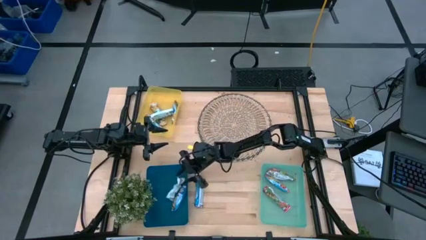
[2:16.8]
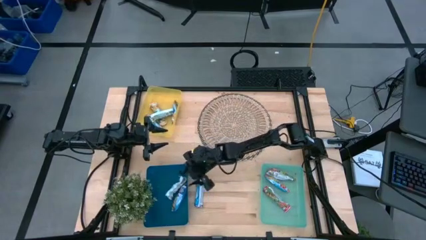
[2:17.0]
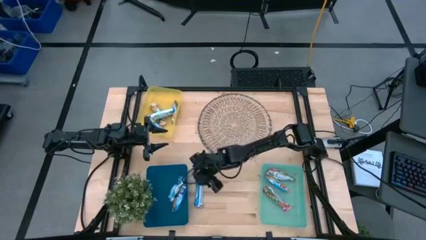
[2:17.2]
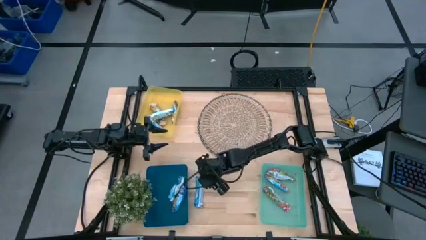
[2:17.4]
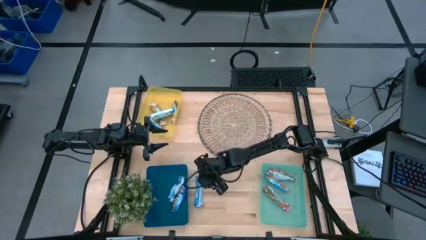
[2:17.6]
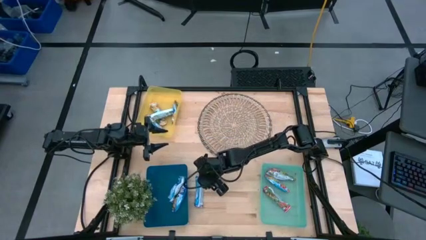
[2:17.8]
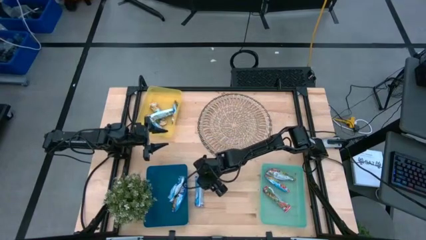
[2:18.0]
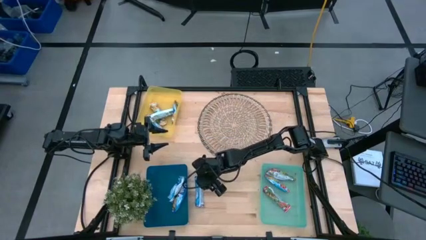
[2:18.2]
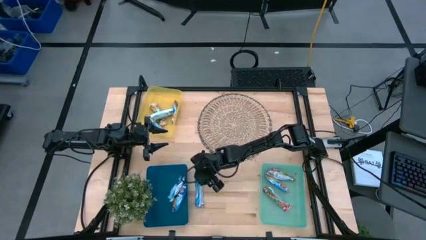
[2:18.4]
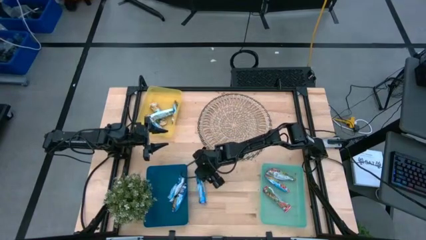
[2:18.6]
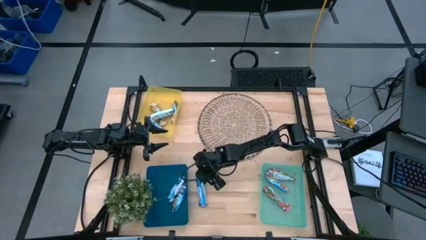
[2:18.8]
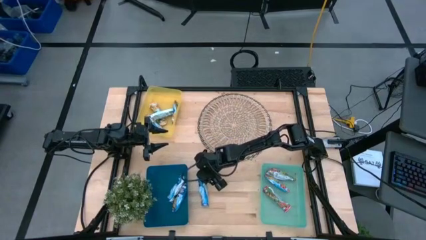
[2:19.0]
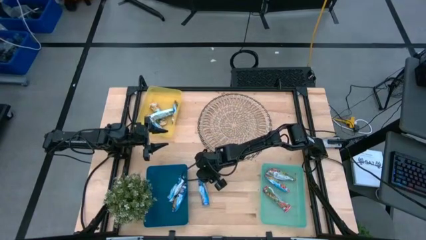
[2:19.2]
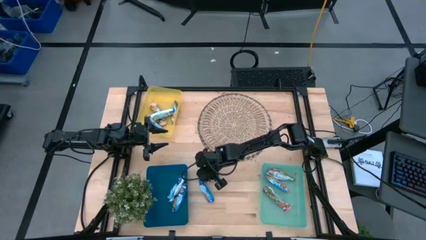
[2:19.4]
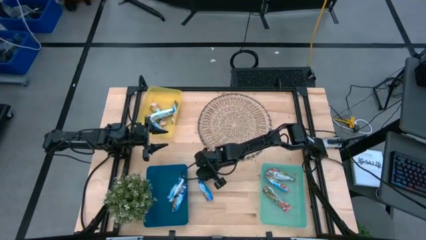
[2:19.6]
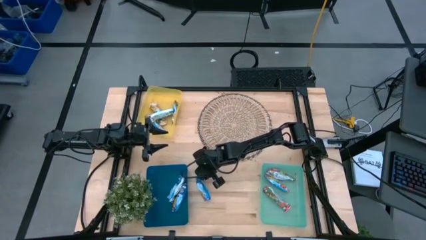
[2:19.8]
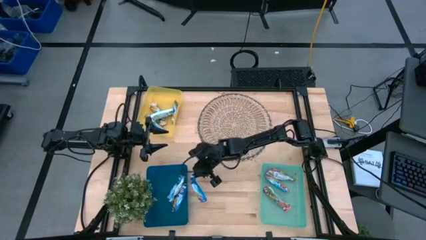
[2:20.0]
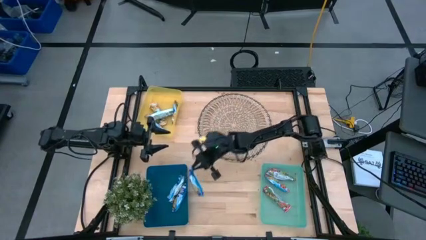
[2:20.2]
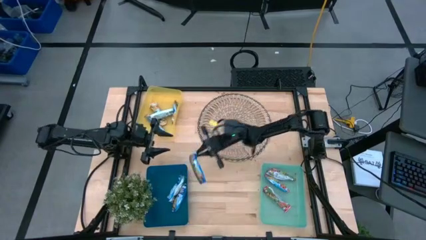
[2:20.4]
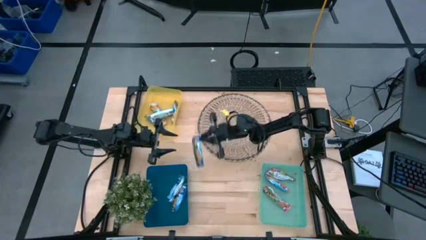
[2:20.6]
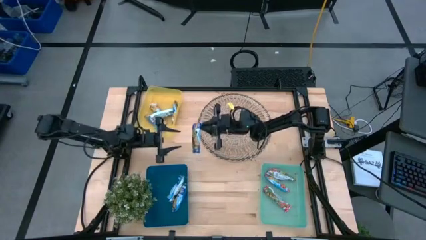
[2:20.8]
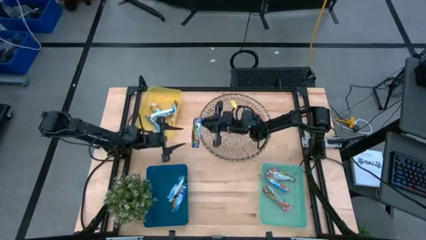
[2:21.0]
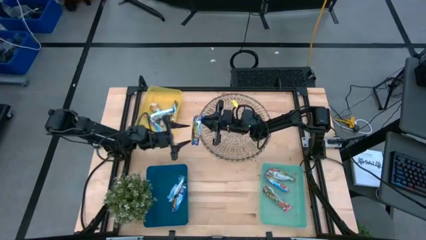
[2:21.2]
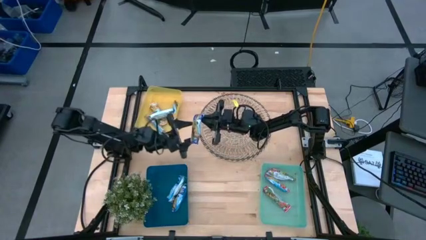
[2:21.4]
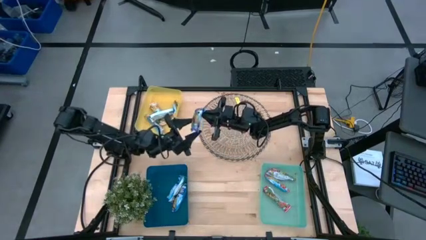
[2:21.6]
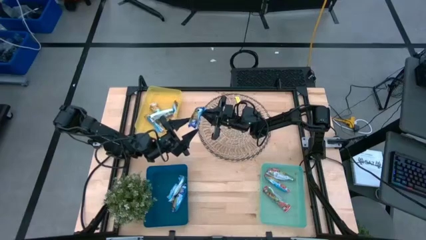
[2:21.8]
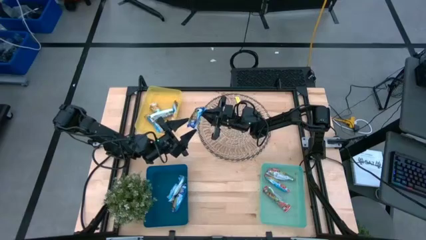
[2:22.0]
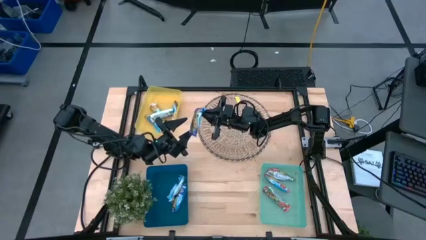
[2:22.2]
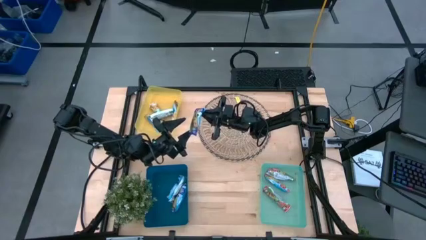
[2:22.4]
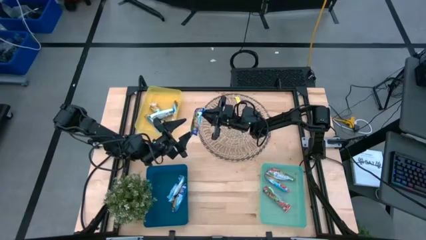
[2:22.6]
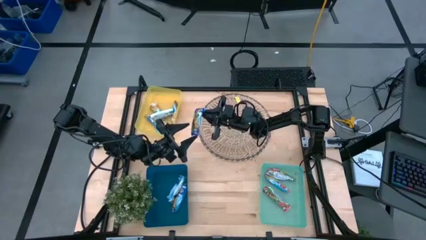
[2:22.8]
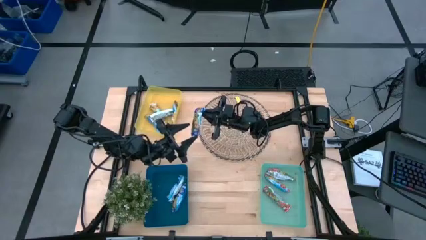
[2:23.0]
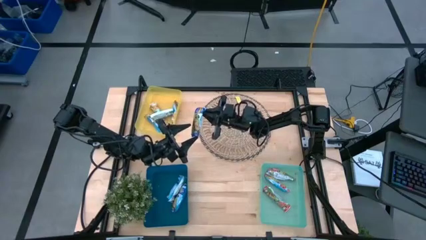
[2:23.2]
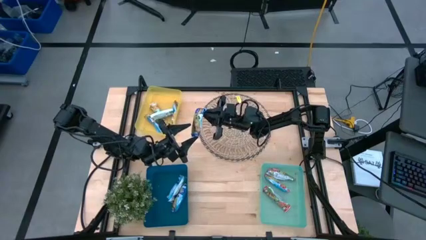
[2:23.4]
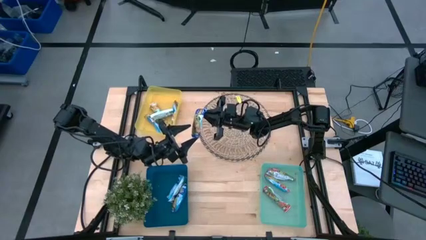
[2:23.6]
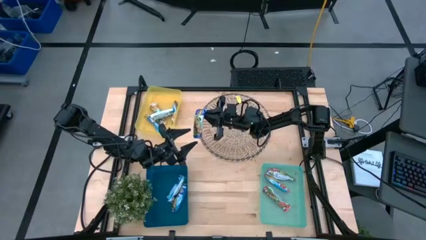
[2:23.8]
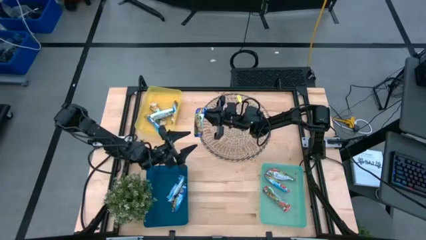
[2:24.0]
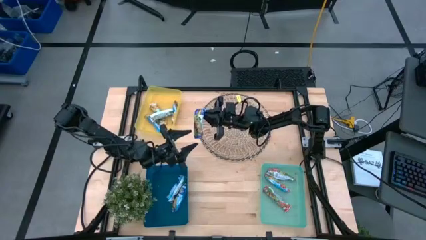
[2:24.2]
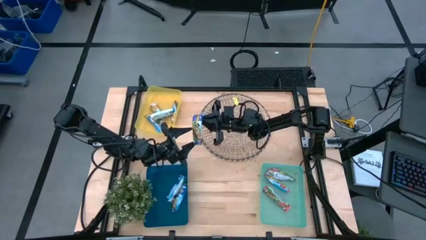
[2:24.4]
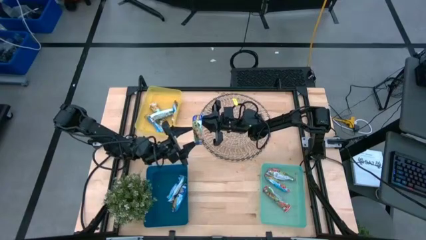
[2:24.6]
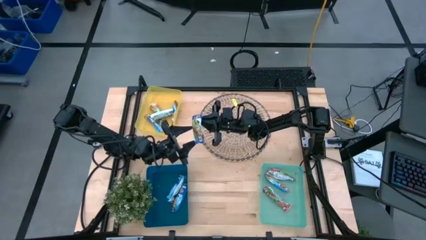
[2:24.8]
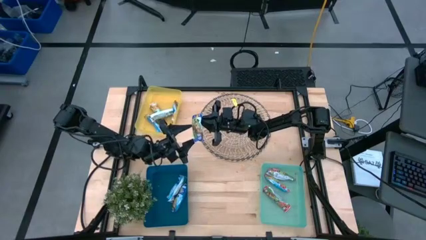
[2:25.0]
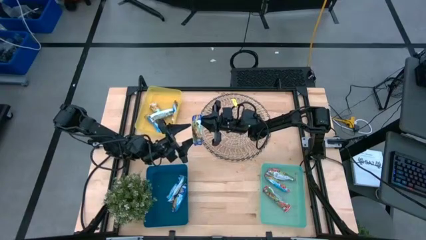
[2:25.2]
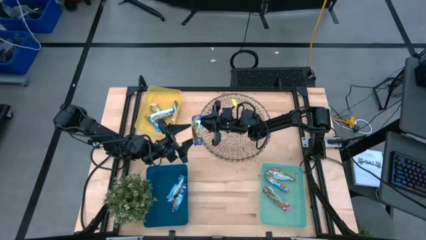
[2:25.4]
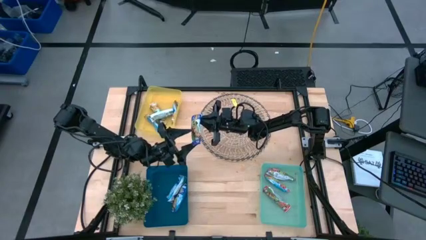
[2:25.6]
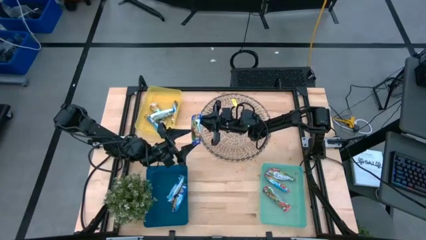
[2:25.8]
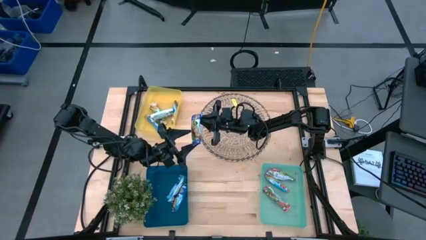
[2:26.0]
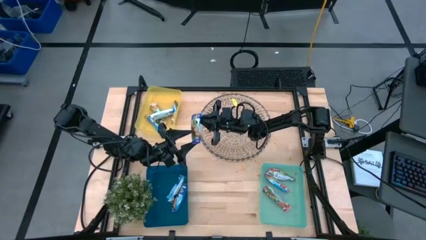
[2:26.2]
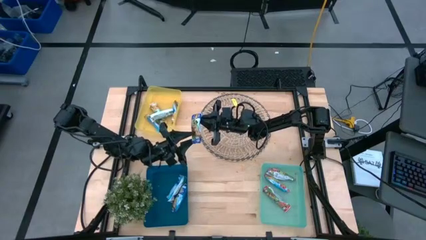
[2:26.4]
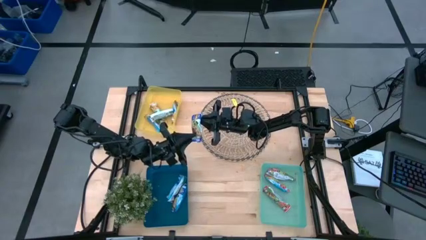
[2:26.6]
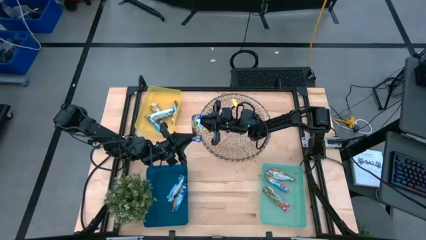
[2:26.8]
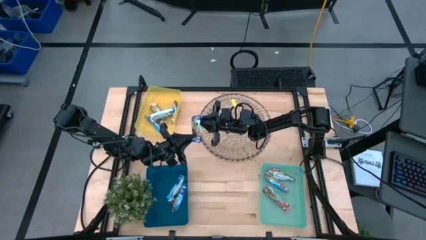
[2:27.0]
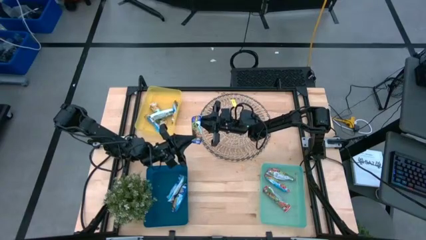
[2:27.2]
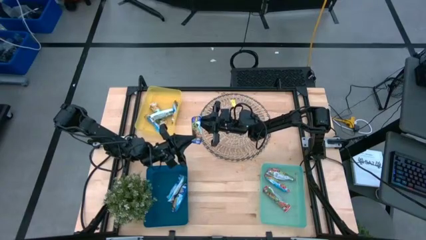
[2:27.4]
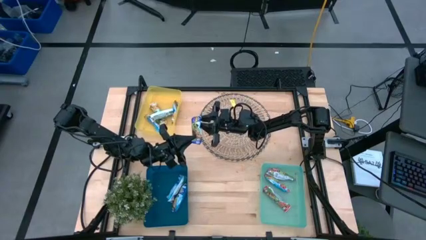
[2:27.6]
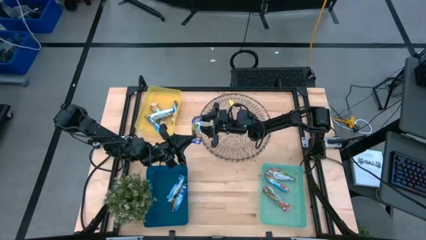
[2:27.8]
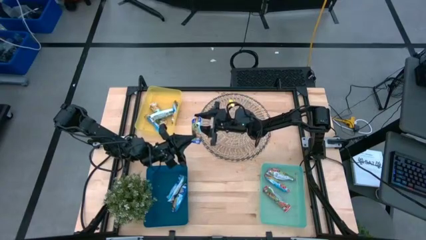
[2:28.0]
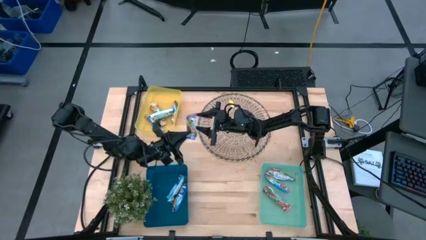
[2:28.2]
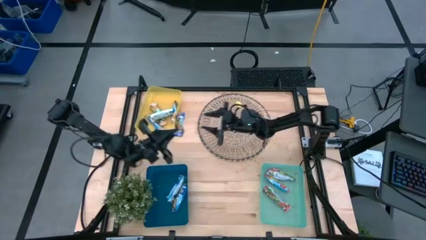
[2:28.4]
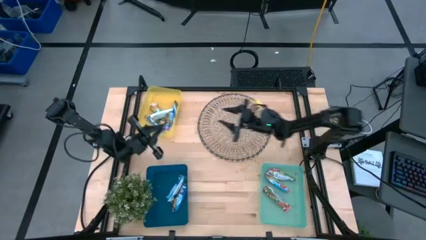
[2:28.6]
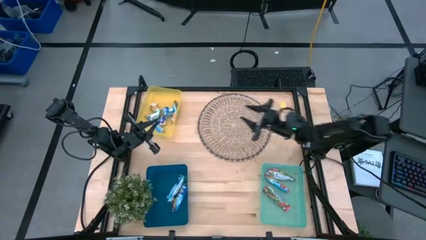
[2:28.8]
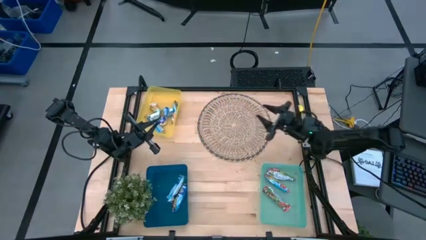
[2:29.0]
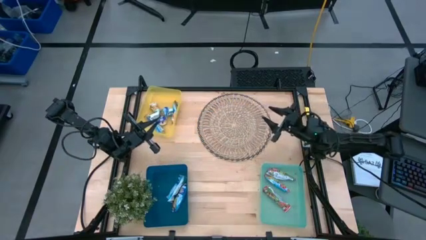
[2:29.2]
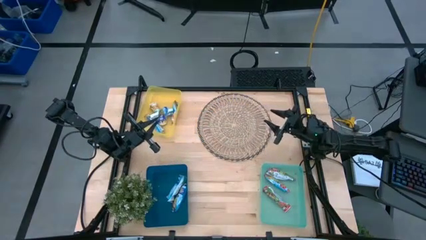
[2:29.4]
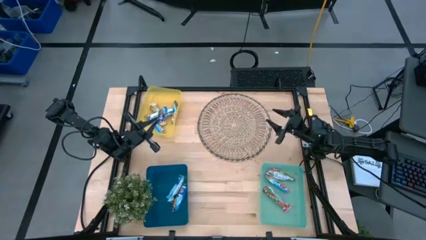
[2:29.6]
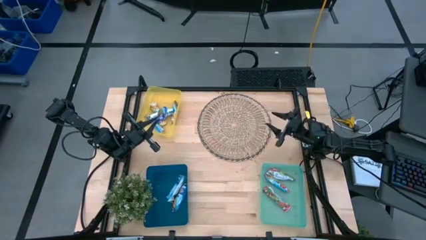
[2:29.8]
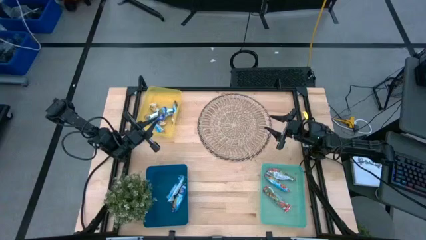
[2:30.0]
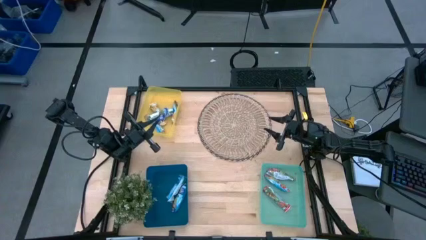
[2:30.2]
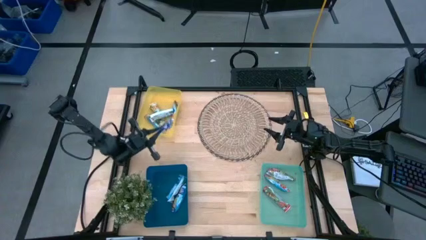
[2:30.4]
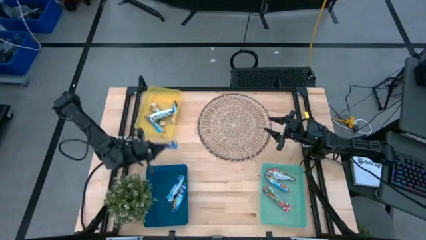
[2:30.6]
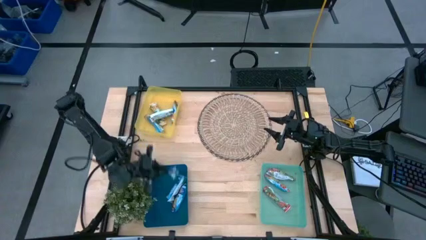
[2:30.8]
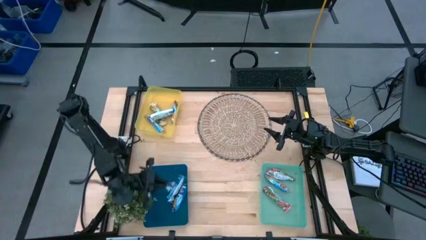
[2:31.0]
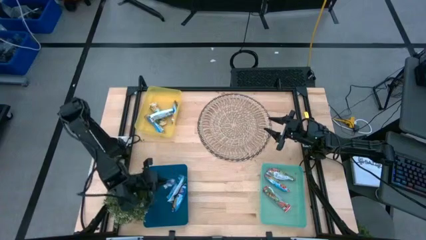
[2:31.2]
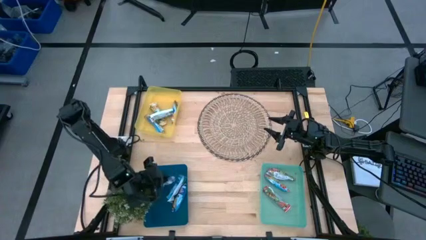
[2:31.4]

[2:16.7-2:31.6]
Task: Pick and place Granola Bars by type
Put the blue granola bar into the blue bin

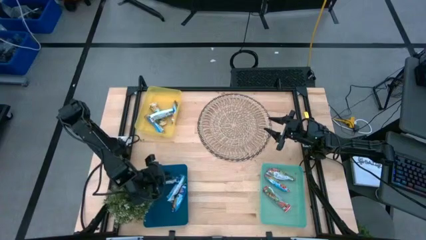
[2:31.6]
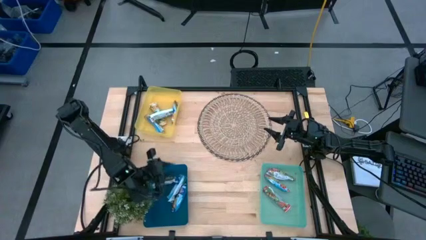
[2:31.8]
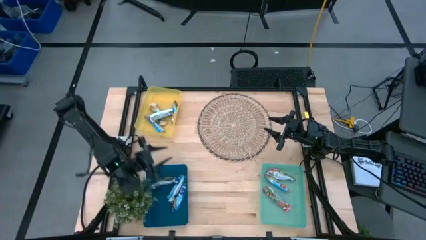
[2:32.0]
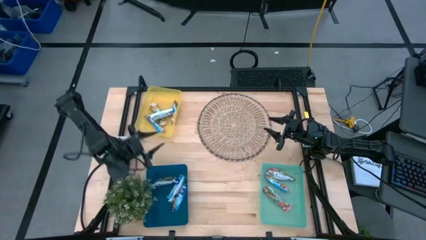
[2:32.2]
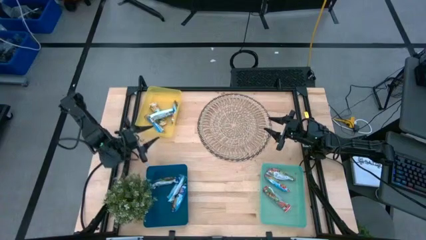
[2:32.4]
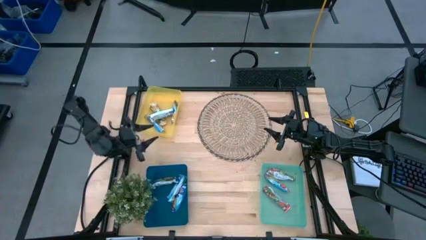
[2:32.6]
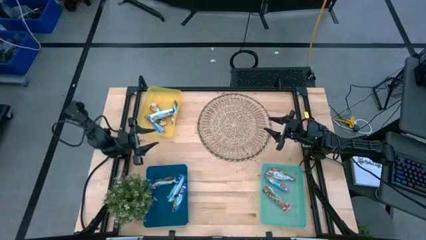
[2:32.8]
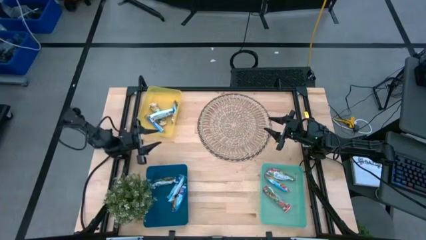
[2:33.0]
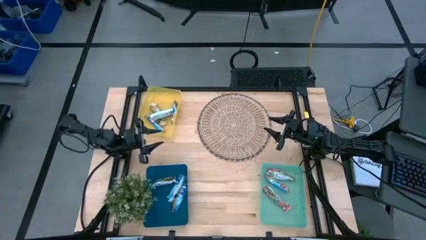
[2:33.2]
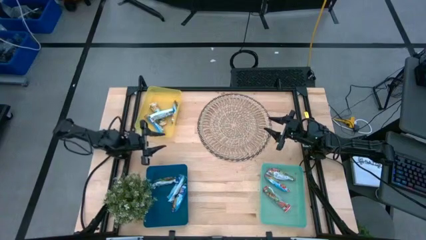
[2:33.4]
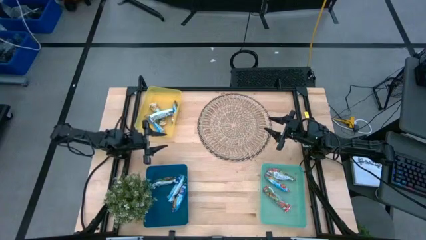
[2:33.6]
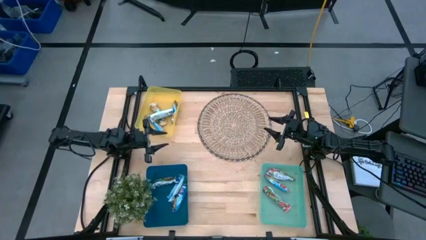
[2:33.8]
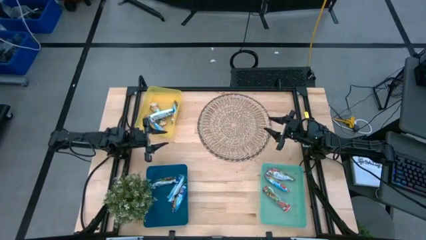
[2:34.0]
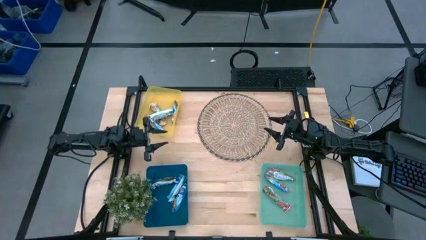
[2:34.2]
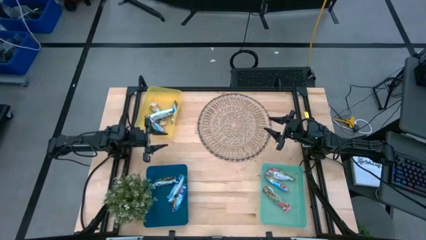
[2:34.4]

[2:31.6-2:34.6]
Return to Home Position
